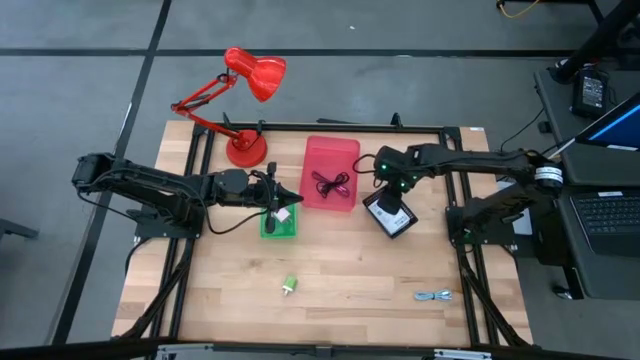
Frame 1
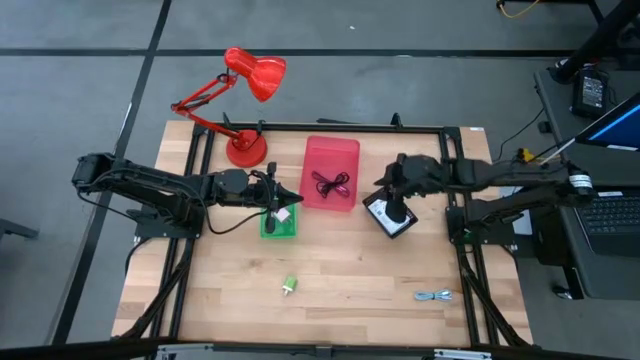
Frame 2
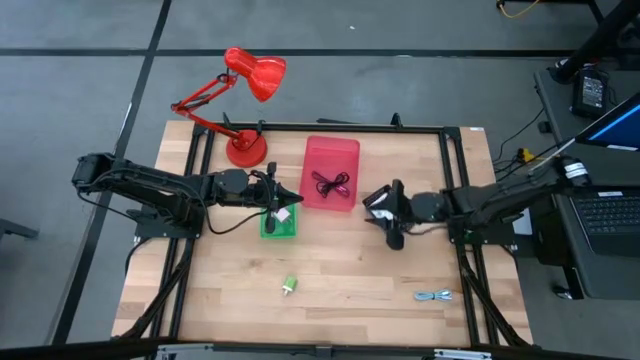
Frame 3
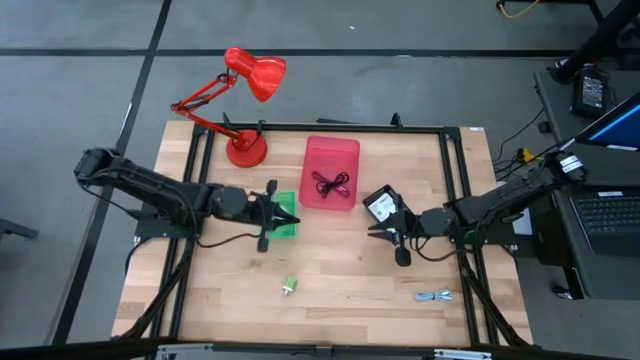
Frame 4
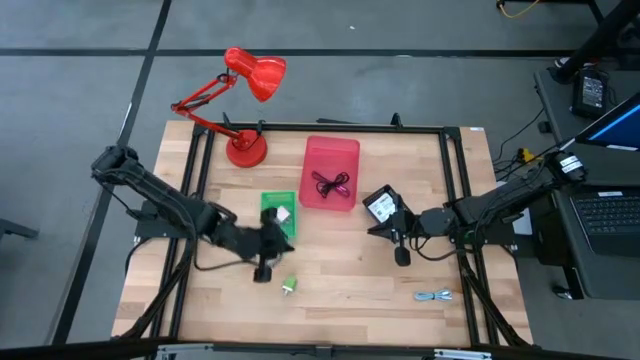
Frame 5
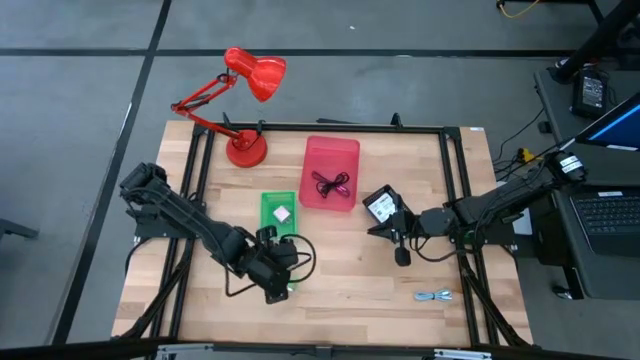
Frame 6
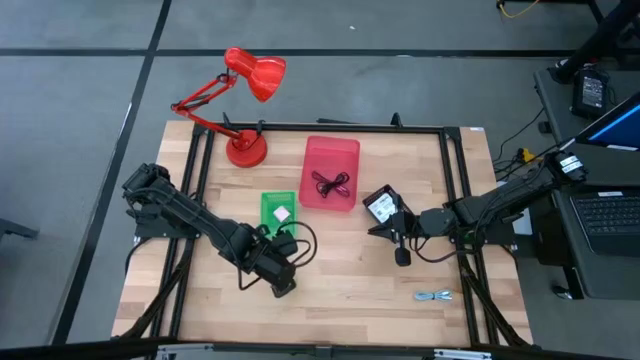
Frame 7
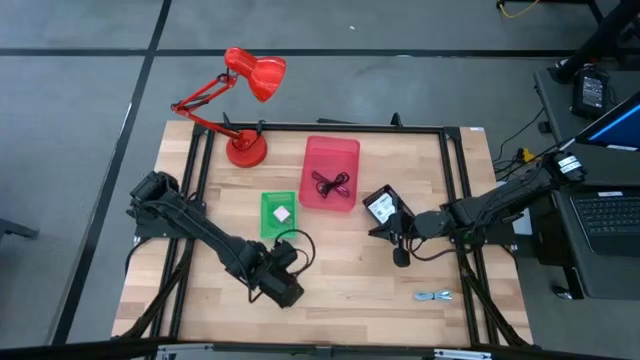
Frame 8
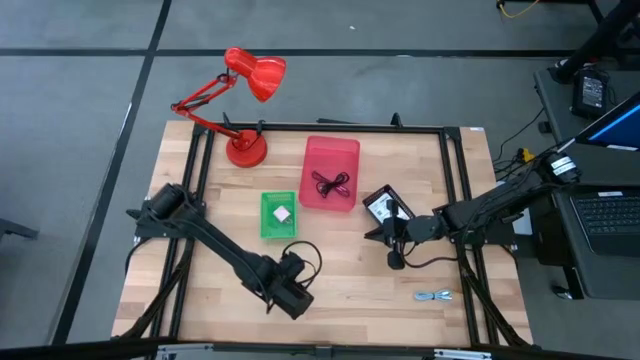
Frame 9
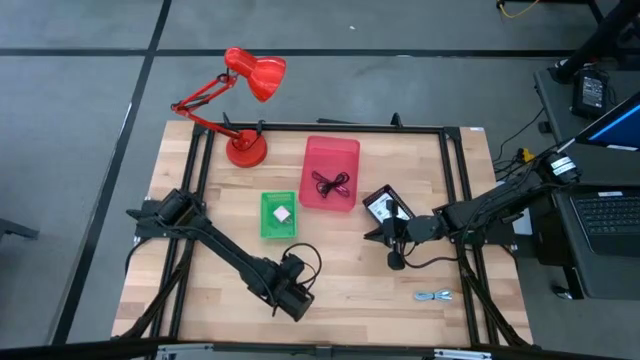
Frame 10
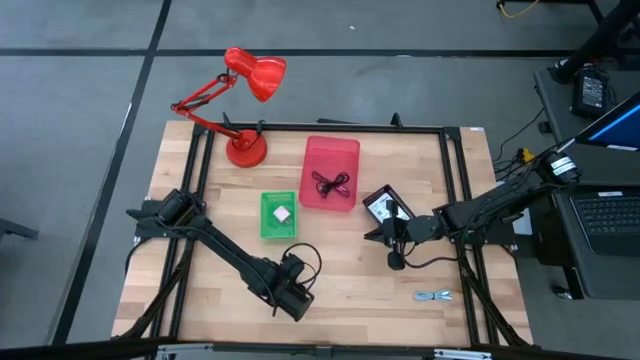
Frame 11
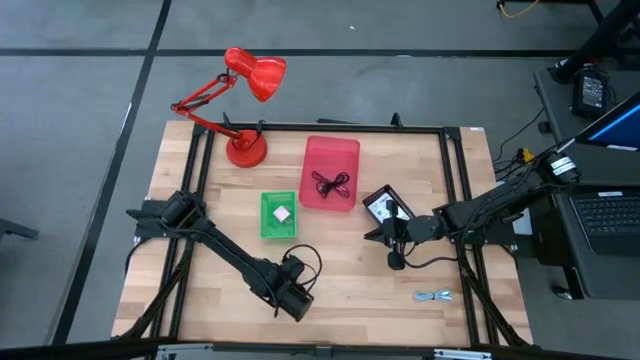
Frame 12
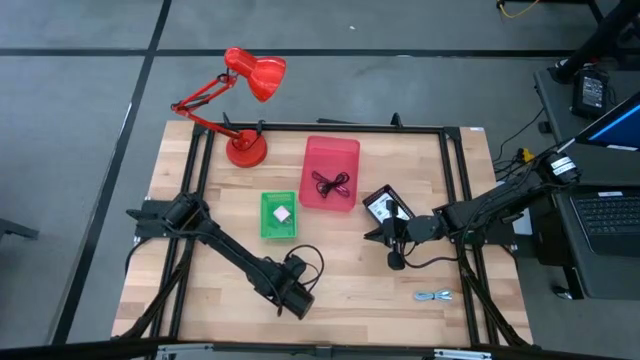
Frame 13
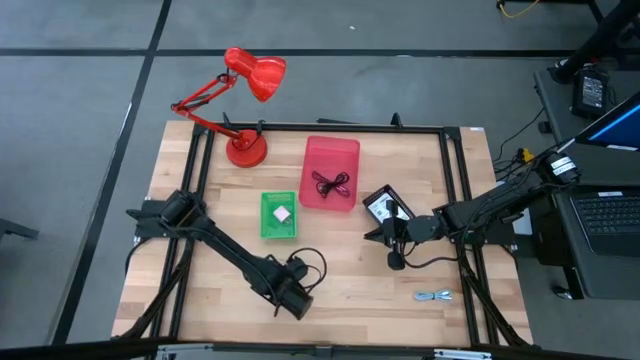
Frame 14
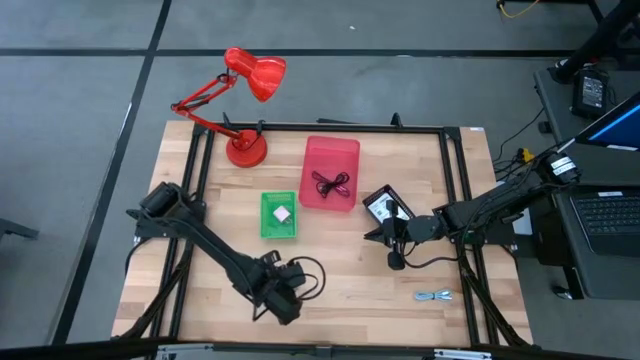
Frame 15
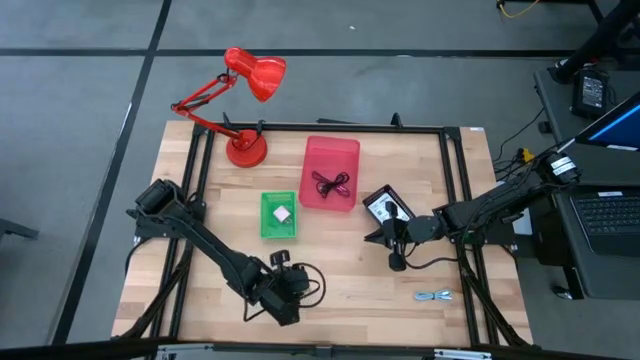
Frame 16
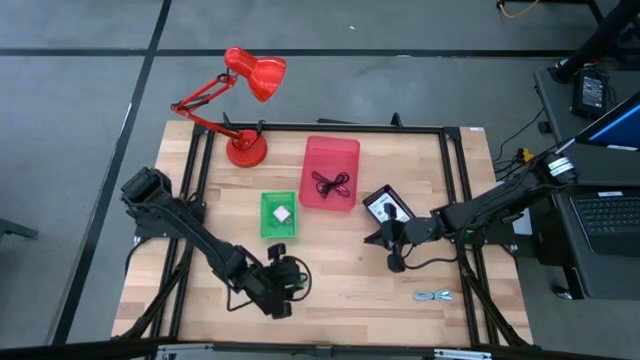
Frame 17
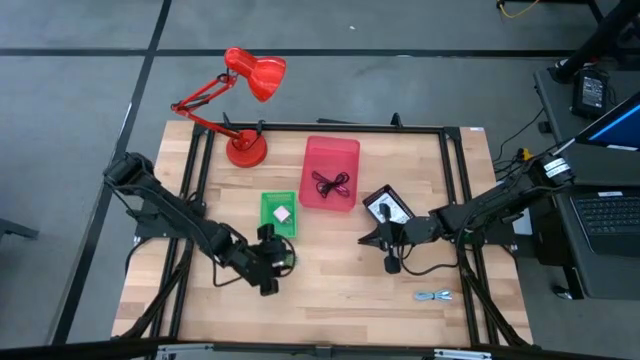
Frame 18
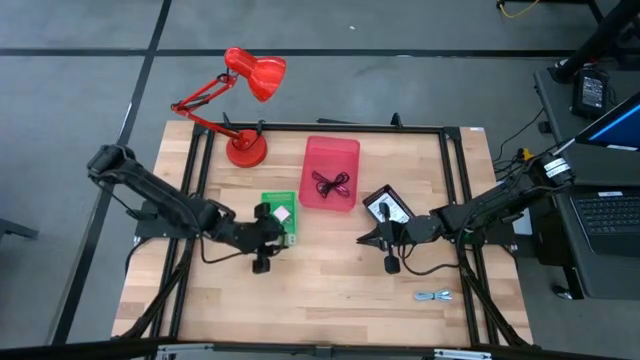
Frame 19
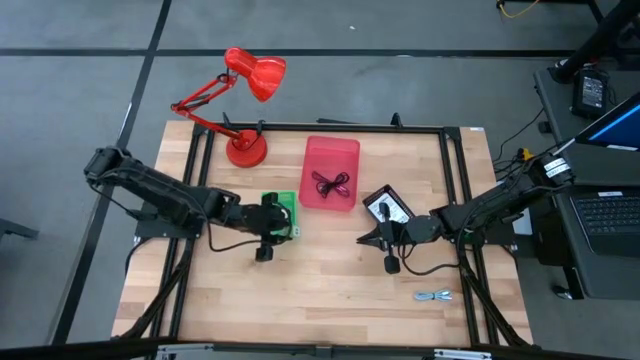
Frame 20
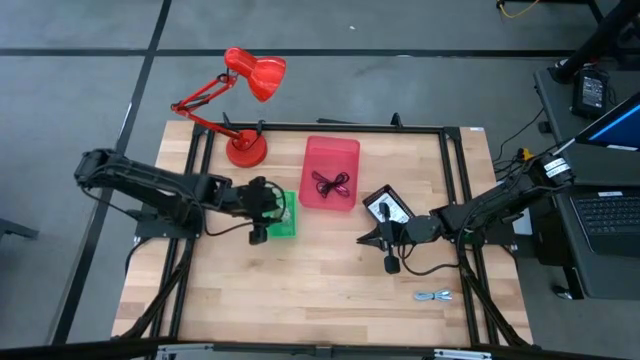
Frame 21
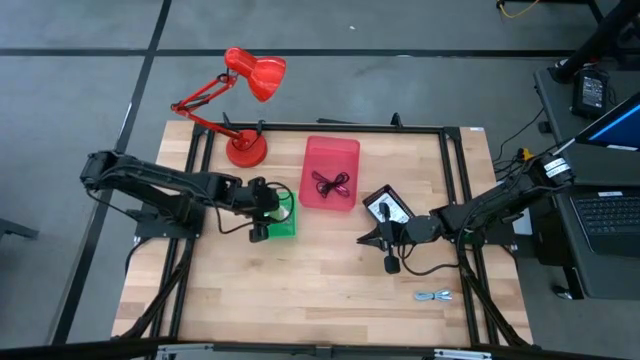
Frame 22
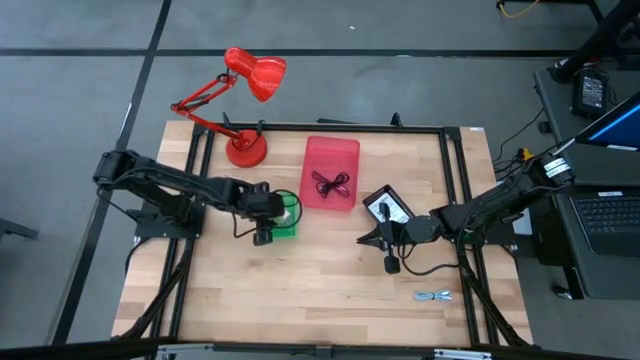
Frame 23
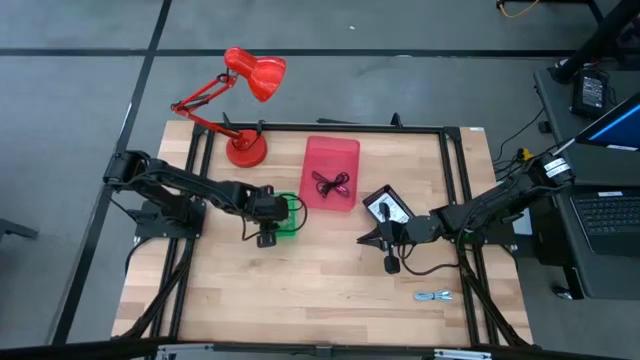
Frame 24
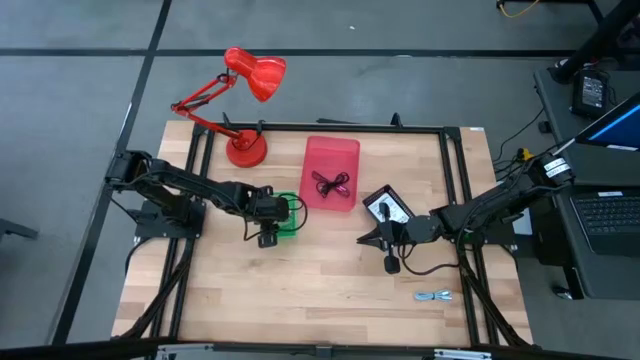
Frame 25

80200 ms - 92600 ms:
Task: Pick and place items into bin
Put the green charger adapter into the green bin

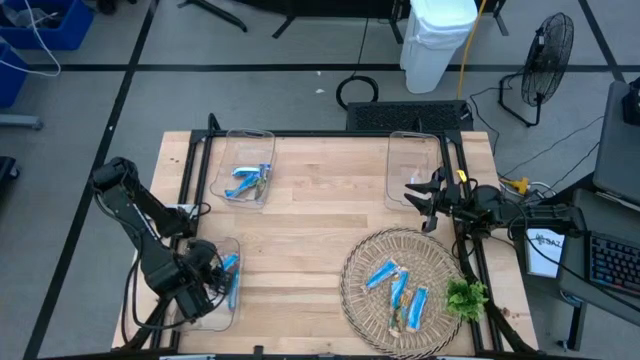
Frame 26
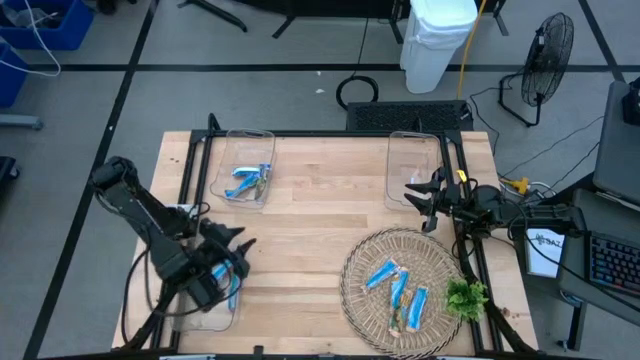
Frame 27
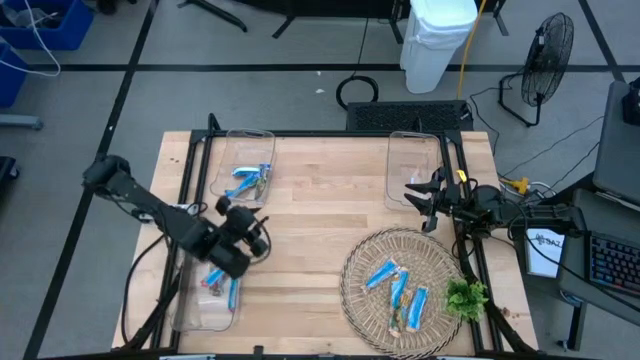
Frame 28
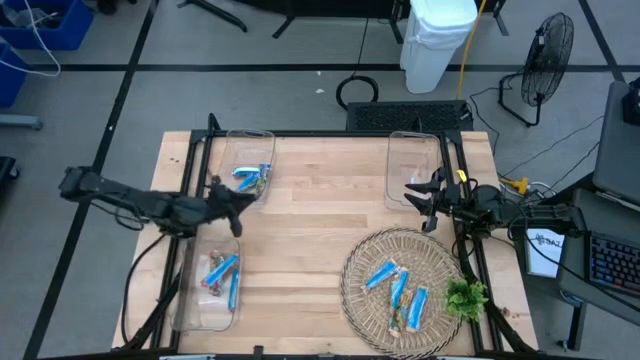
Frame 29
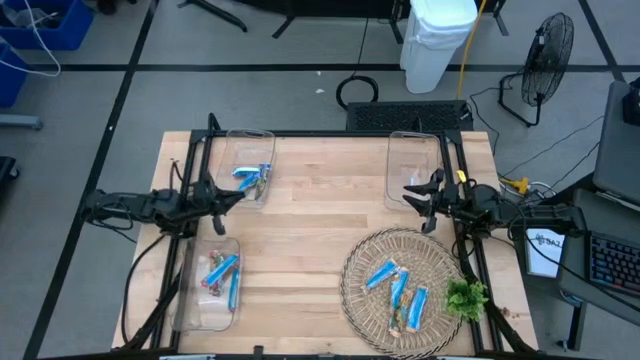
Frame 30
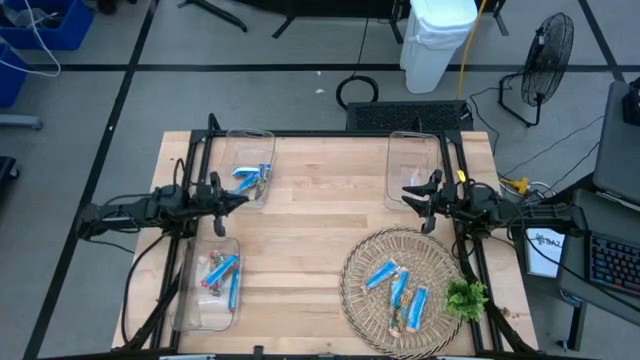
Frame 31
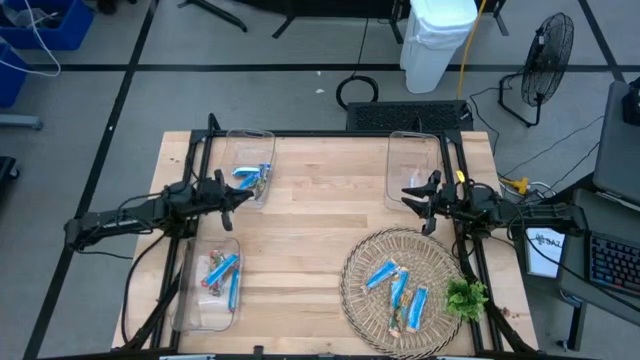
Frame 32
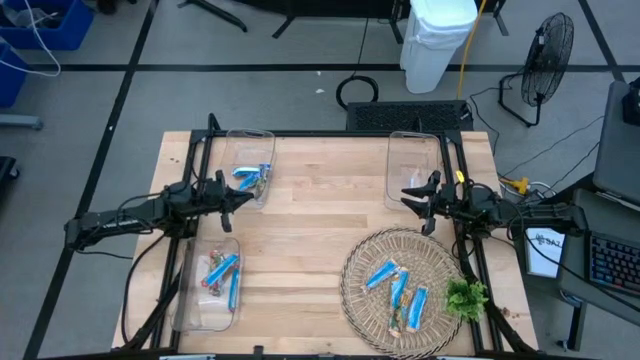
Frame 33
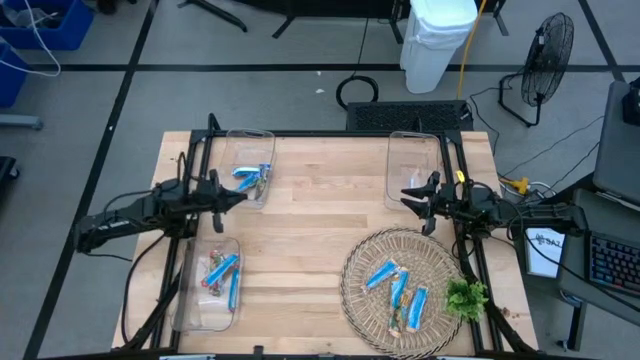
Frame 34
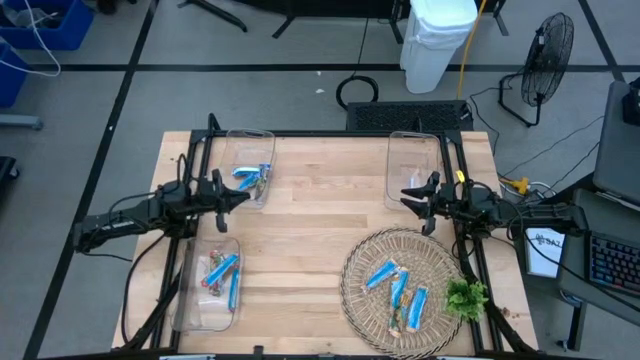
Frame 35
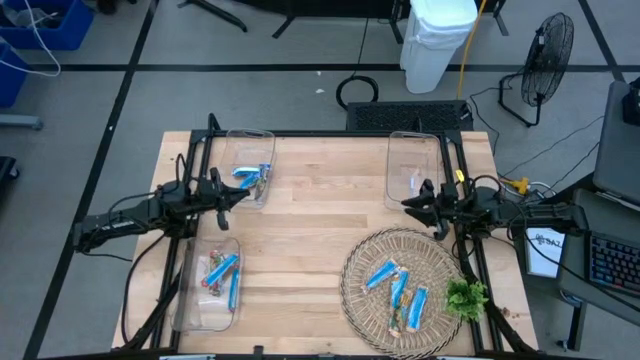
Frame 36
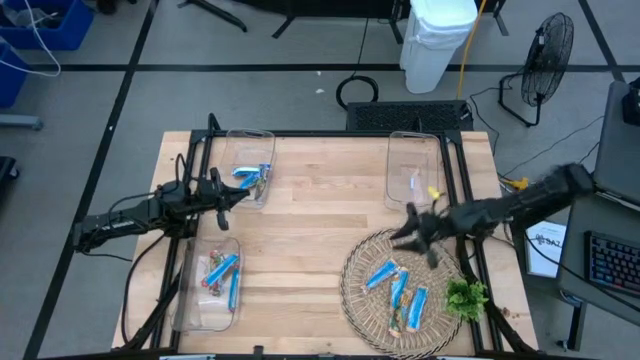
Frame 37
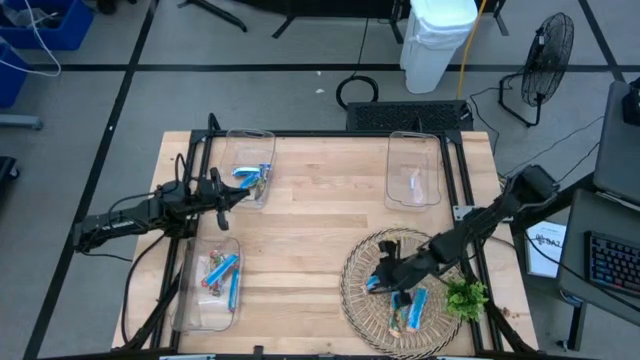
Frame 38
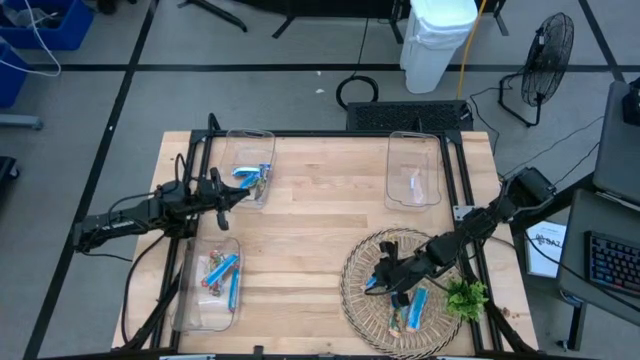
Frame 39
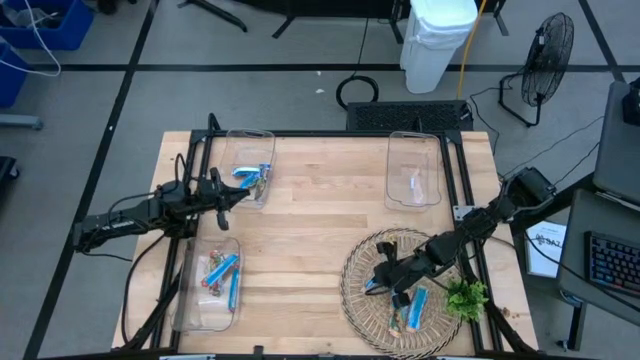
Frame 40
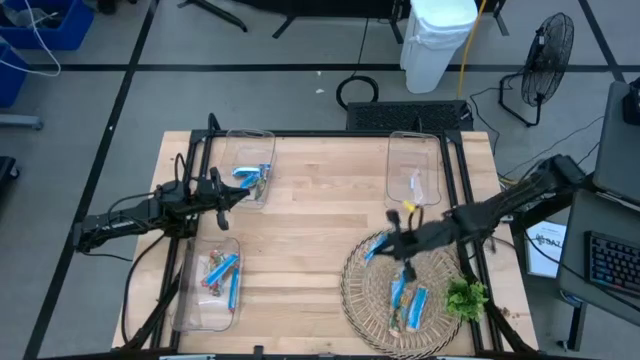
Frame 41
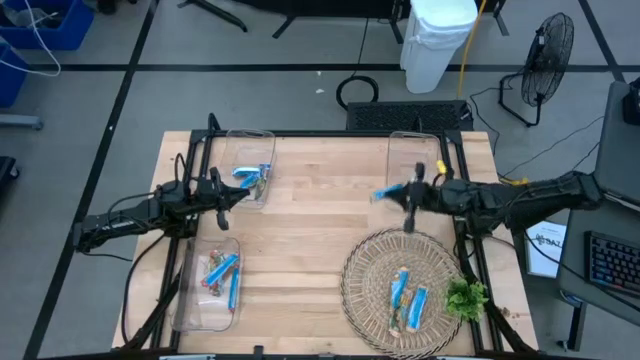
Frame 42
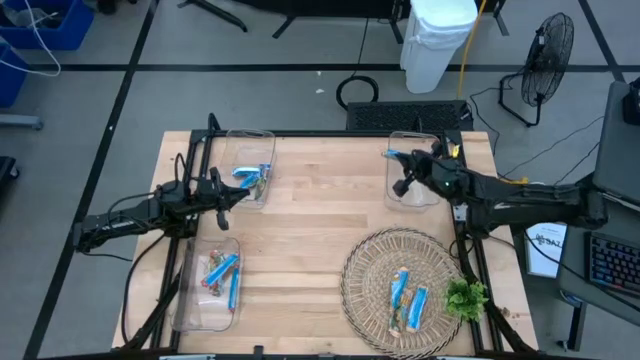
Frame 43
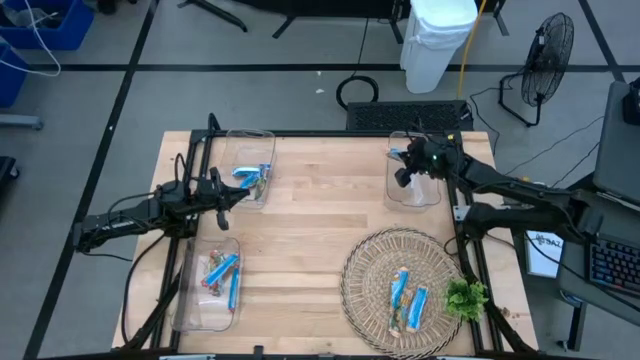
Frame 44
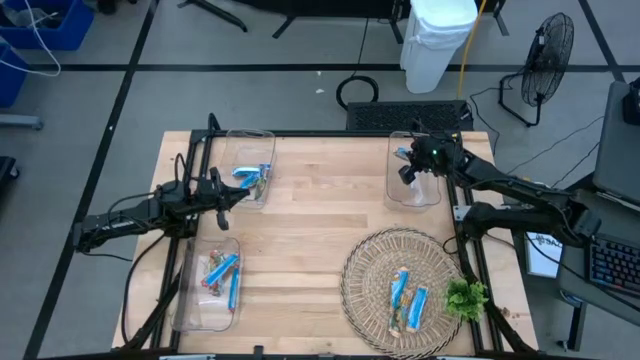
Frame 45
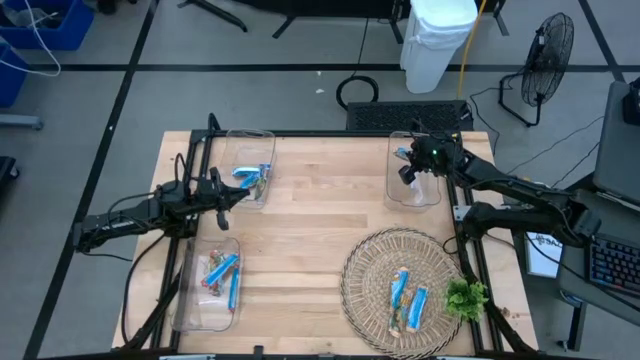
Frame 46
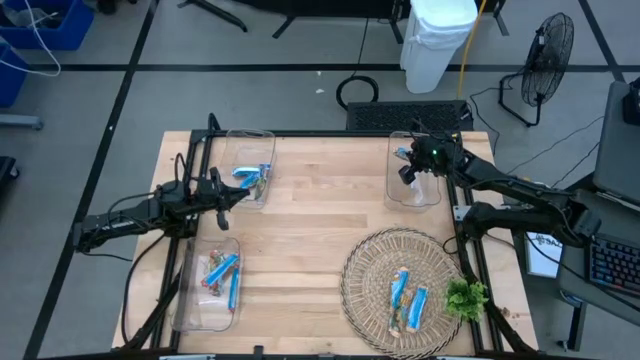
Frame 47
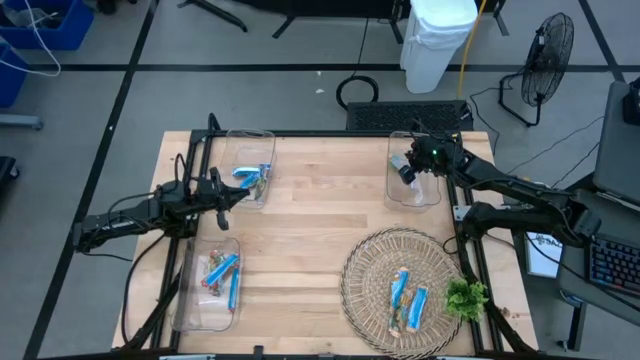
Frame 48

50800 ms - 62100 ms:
Task: Pick and place Granola Bars by type
Put the yellow granola bar into the top right transparent bin
